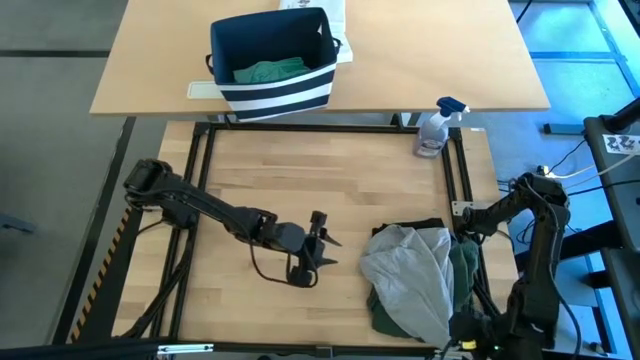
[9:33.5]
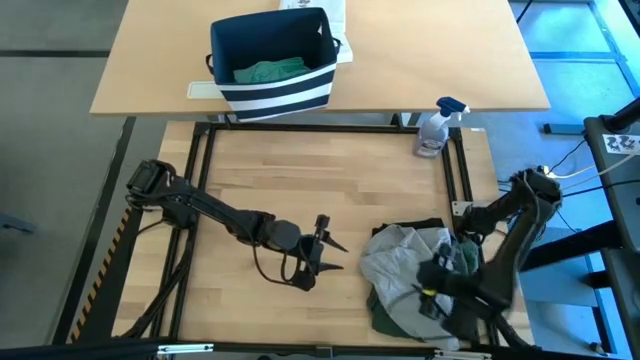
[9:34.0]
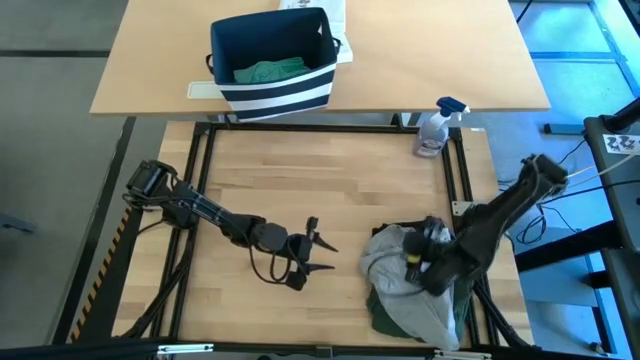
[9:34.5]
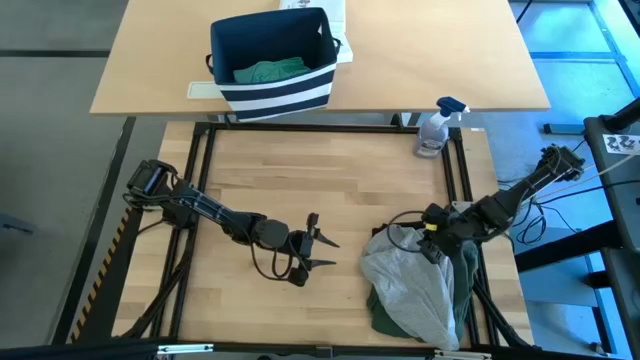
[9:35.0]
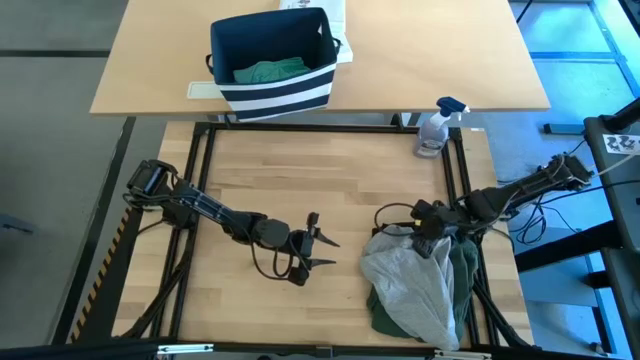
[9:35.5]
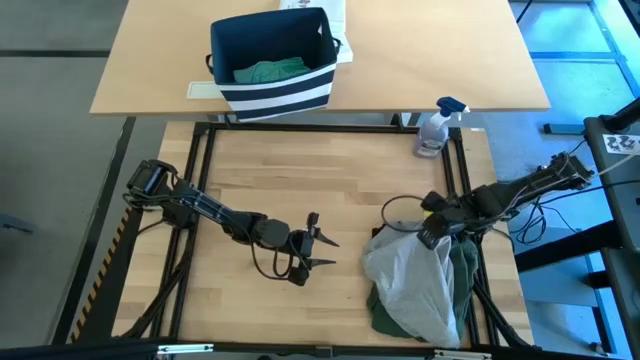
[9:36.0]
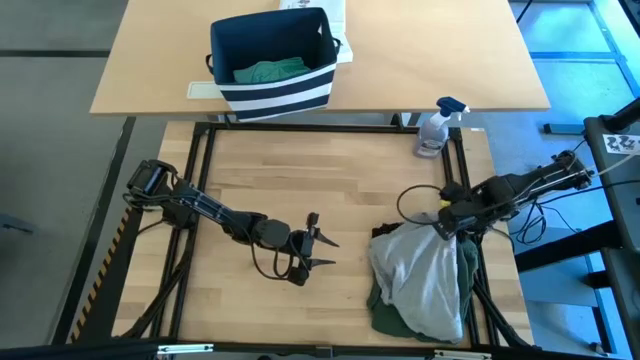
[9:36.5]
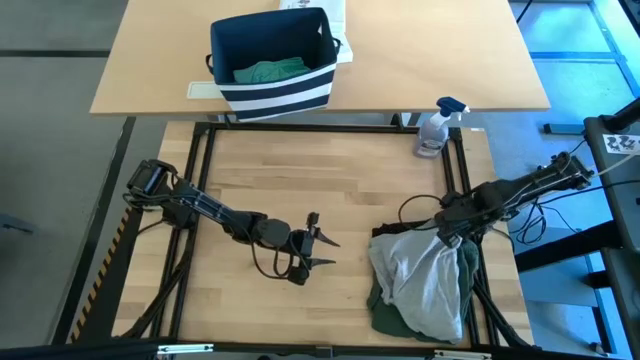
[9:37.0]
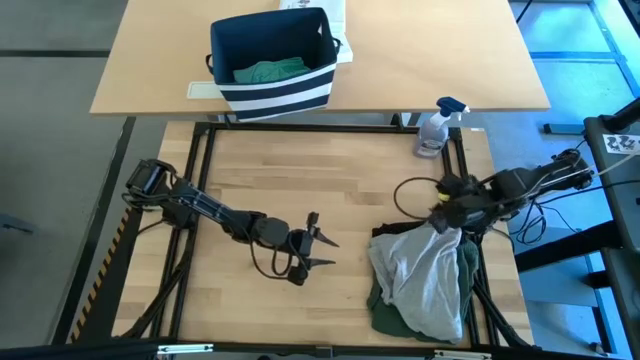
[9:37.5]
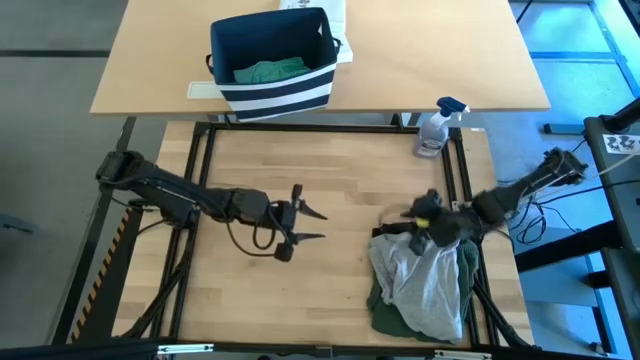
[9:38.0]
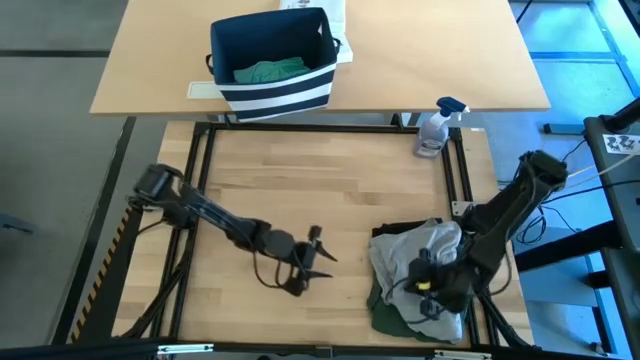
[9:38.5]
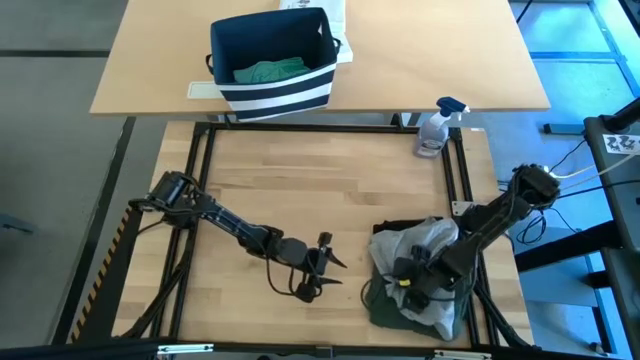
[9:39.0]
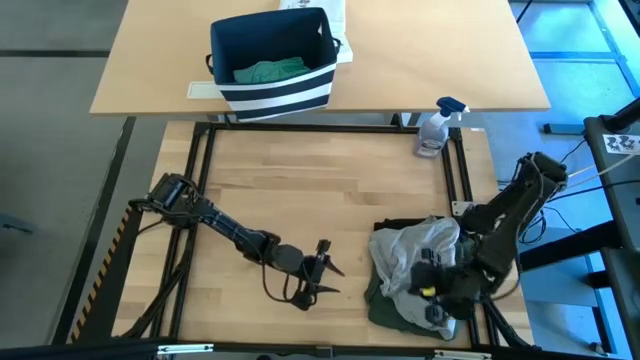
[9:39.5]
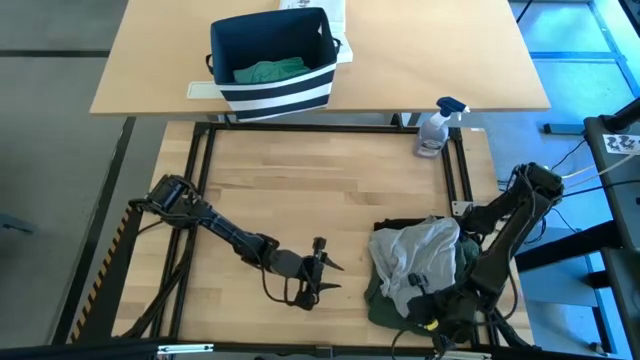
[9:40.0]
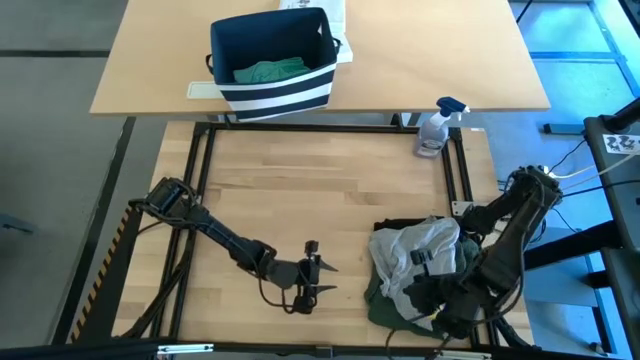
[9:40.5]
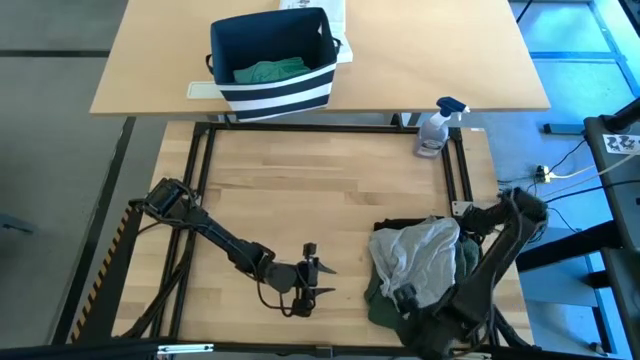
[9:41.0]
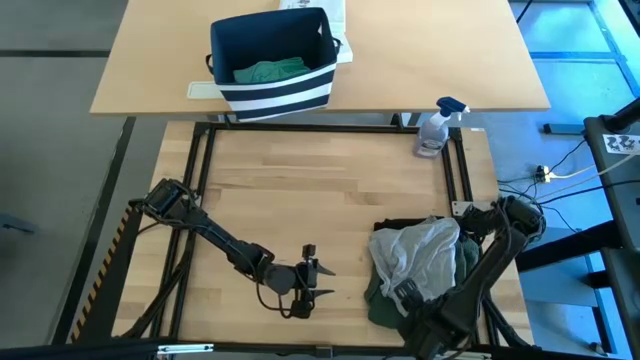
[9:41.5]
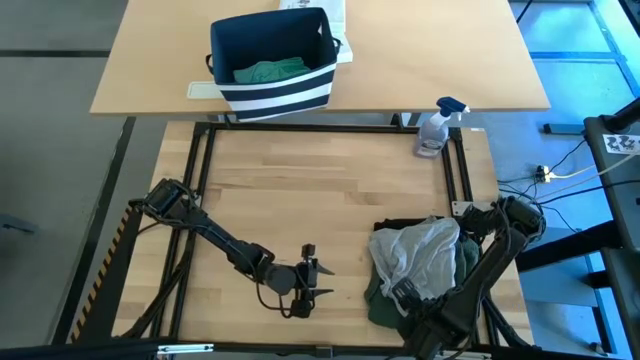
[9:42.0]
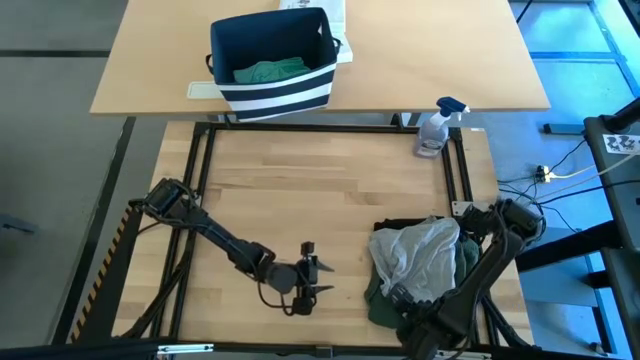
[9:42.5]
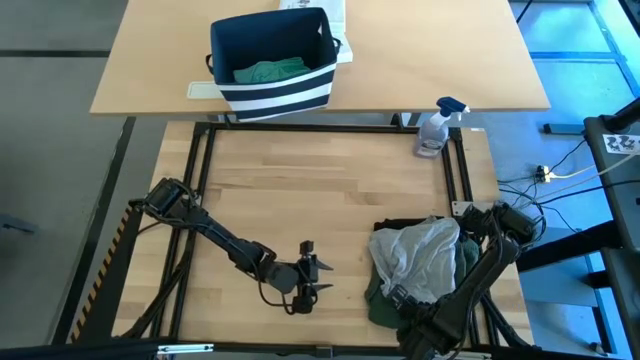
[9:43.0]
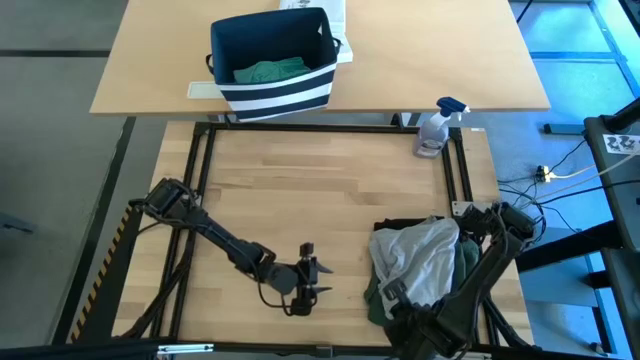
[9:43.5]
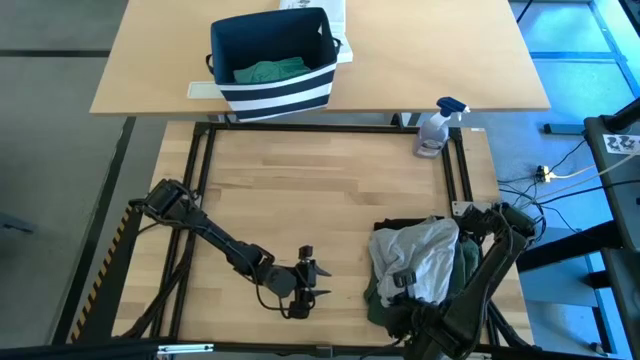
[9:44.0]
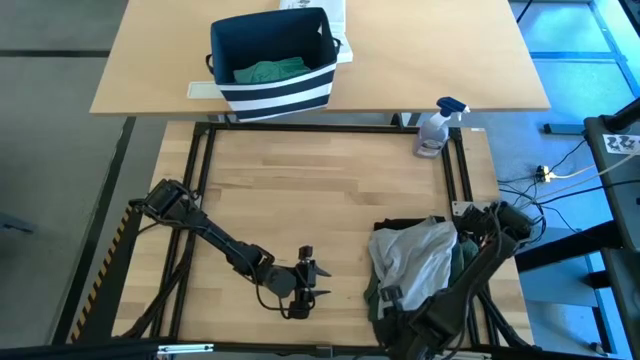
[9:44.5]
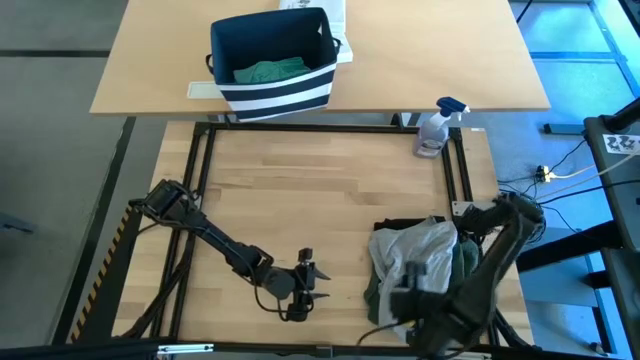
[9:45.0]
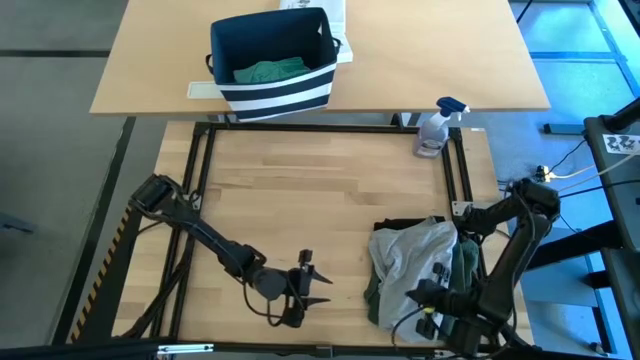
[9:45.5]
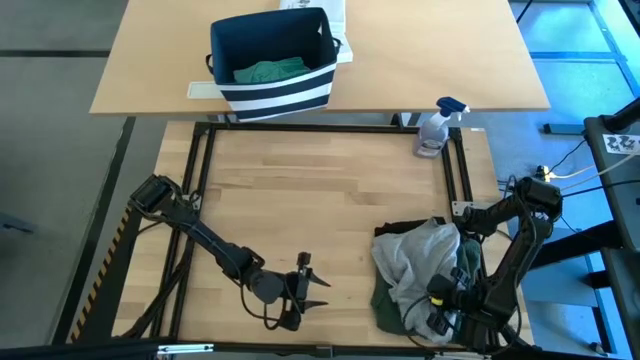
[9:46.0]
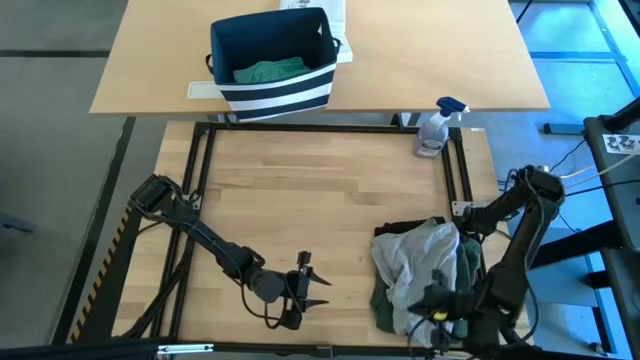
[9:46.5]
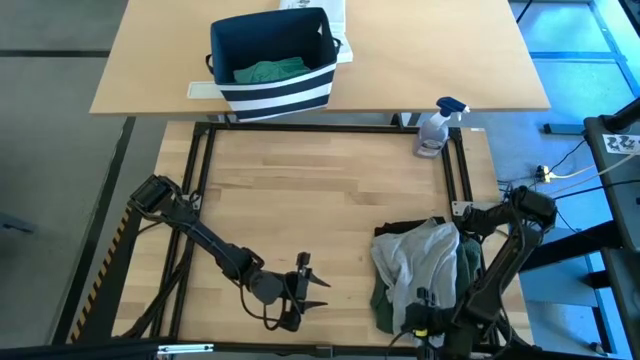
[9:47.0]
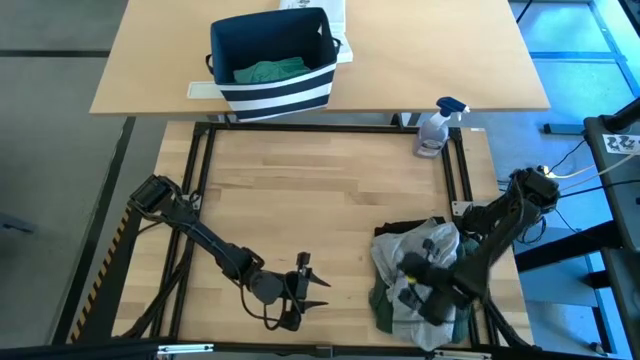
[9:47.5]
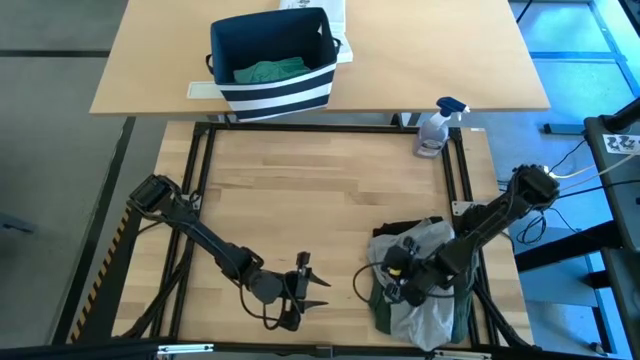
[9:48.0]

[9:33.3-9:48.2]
Task: Fold Laundry from Bin
Stack the folded gray shirt on top of the folded green polo shirt

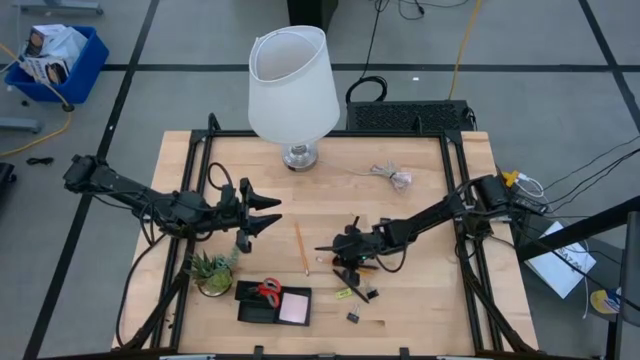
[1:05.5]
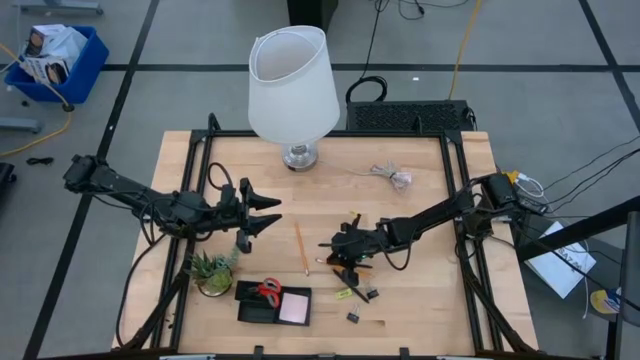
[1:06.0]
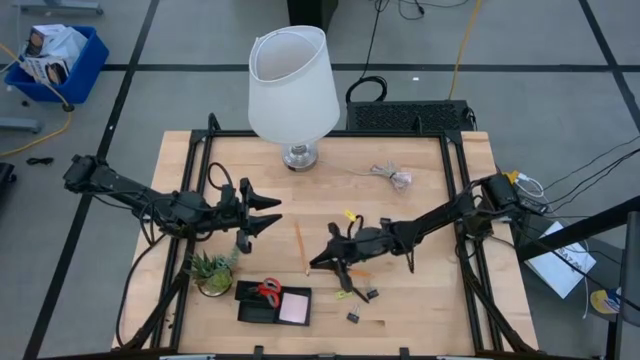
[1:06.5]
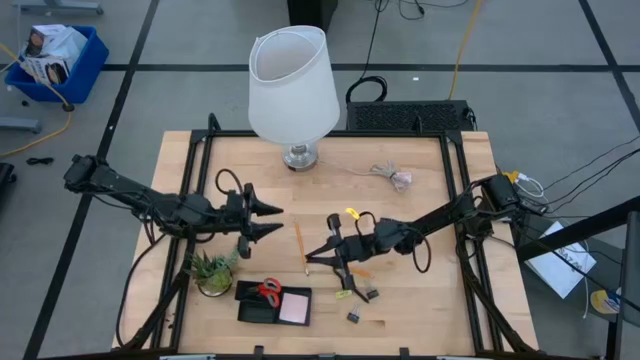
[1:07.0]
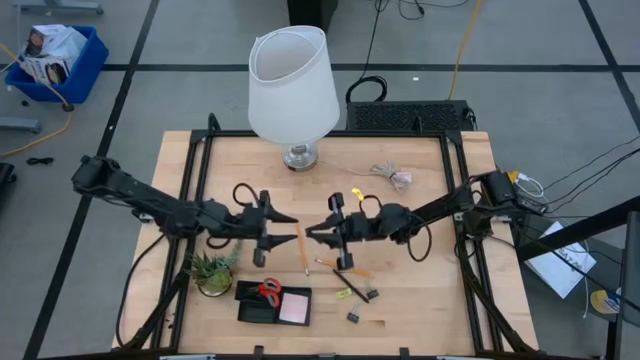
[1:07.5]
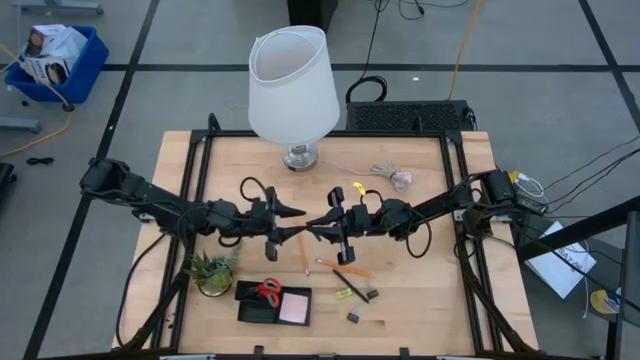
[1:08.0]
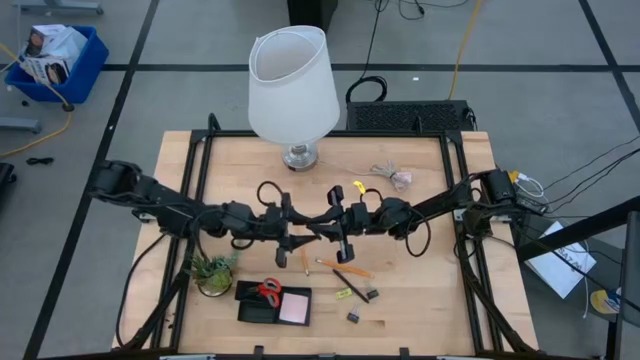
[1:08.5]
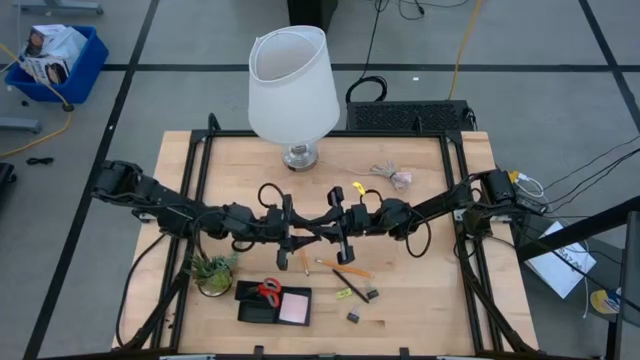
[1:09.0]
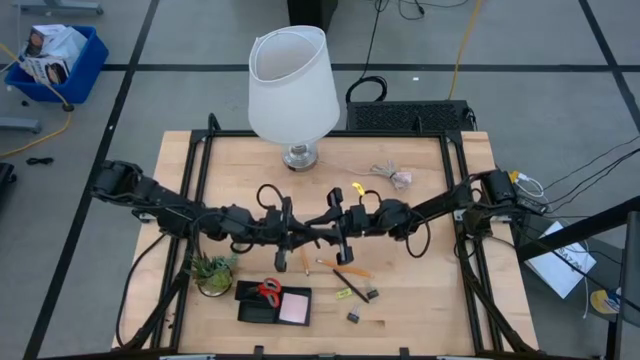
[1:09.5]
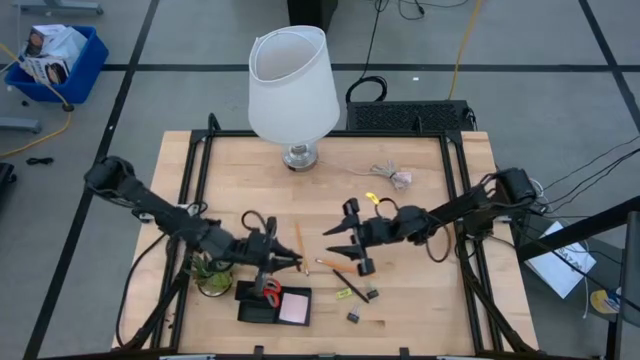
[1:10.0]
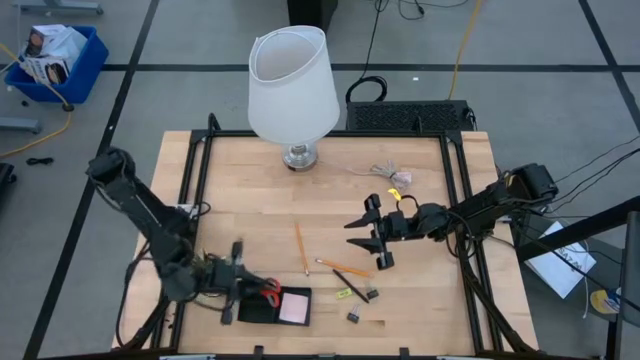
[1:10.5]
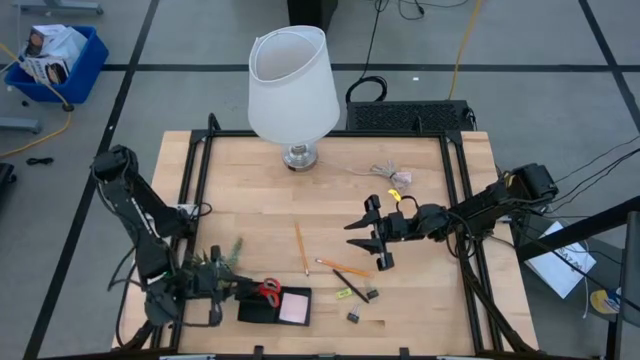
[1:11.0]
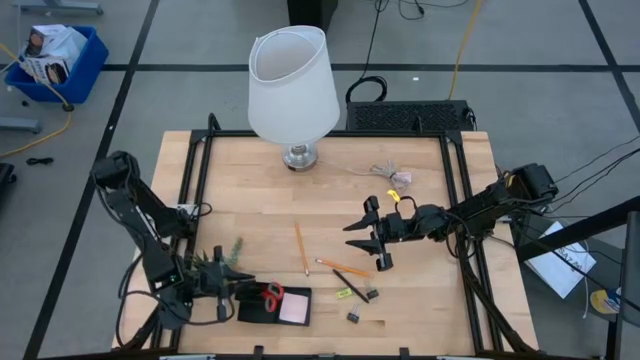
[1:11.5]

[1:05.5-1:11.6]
Task: Pick and place office supplies into organizer
Put the black pen into the black desk organizer
